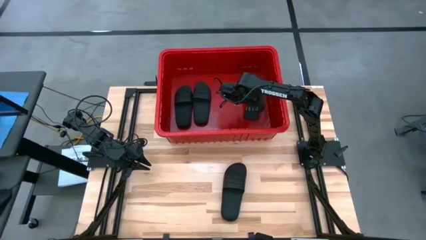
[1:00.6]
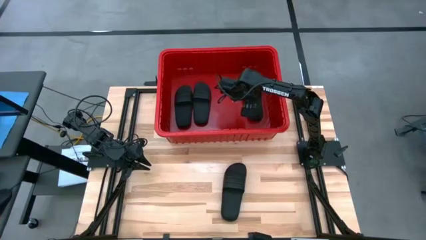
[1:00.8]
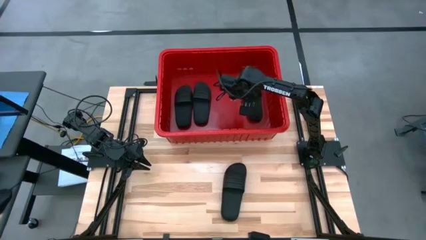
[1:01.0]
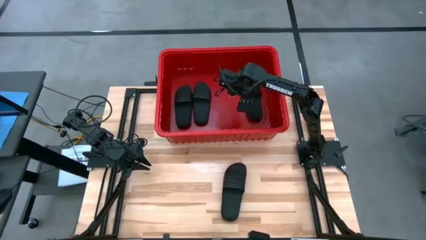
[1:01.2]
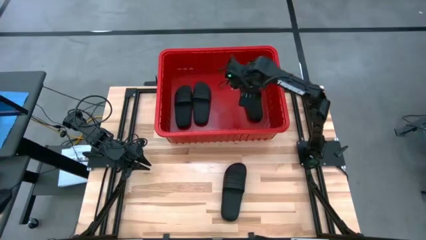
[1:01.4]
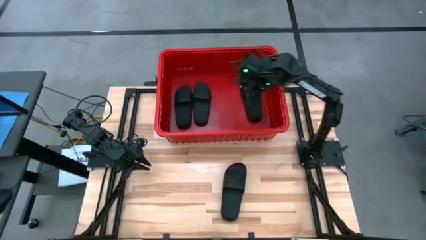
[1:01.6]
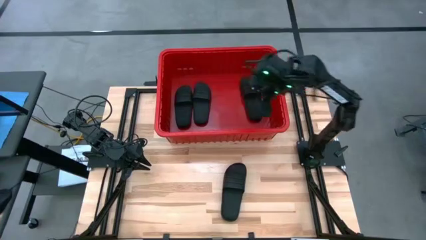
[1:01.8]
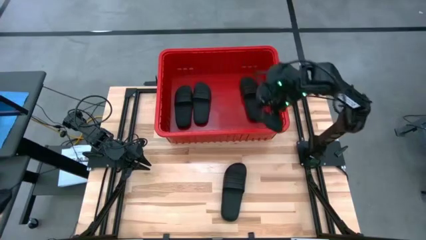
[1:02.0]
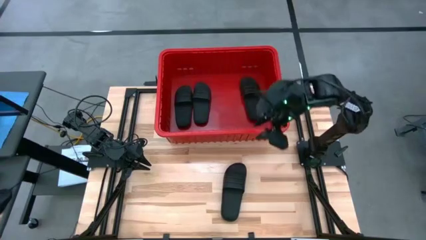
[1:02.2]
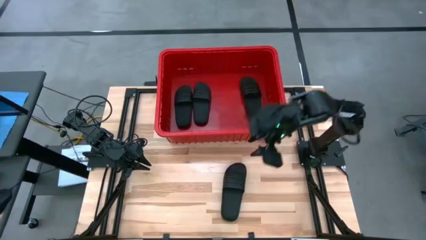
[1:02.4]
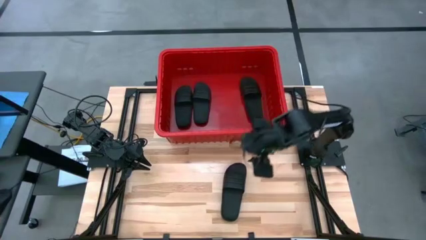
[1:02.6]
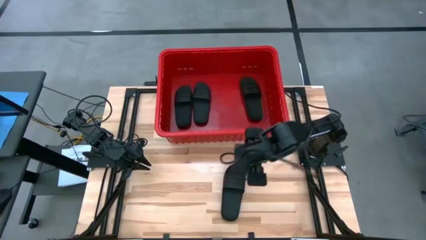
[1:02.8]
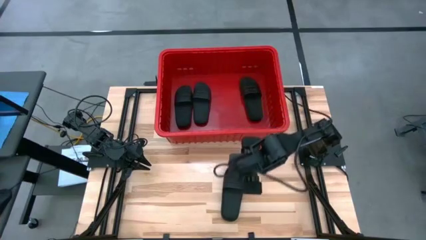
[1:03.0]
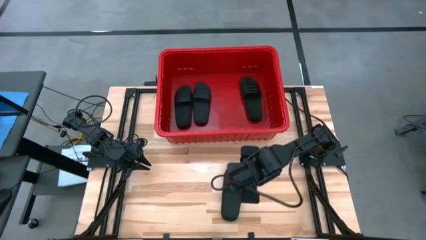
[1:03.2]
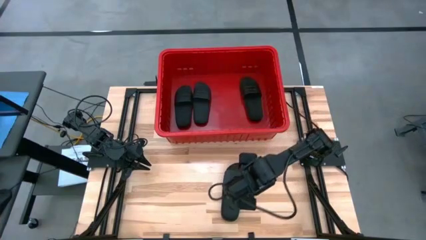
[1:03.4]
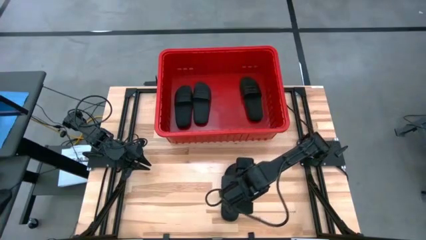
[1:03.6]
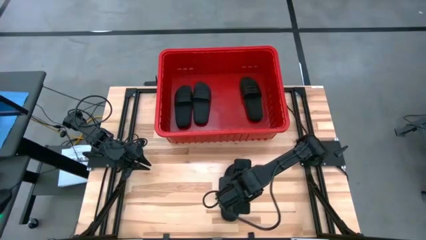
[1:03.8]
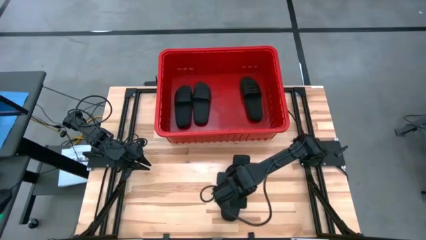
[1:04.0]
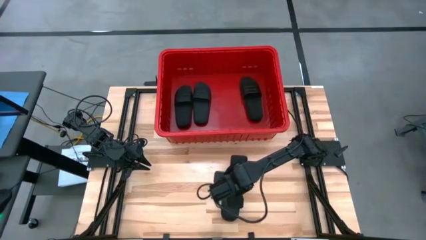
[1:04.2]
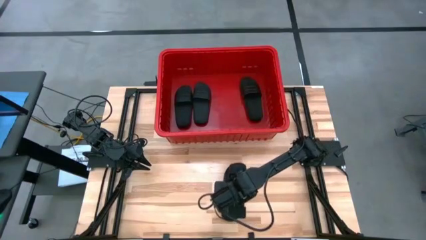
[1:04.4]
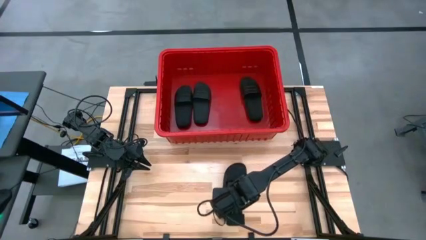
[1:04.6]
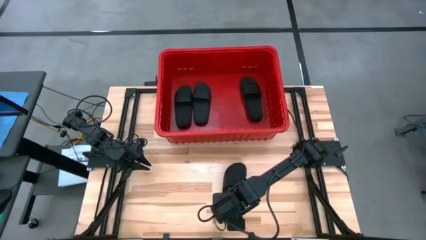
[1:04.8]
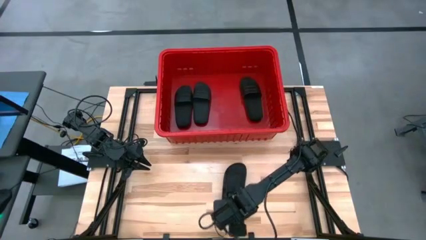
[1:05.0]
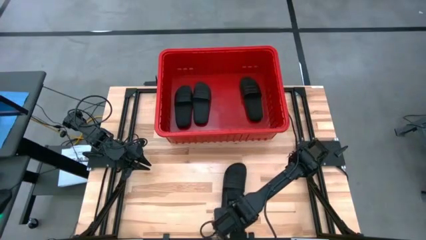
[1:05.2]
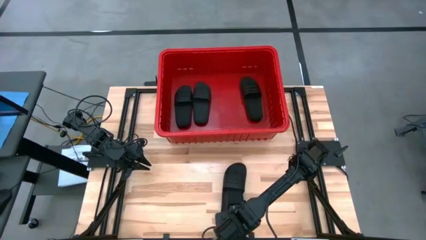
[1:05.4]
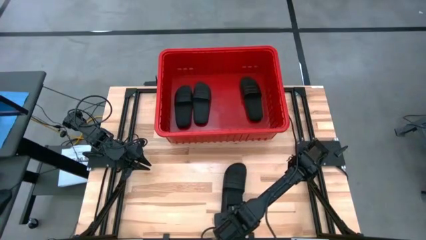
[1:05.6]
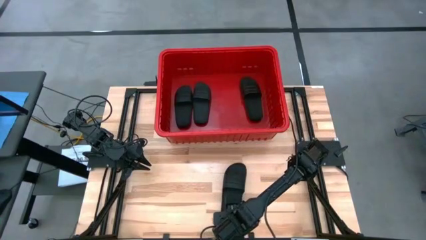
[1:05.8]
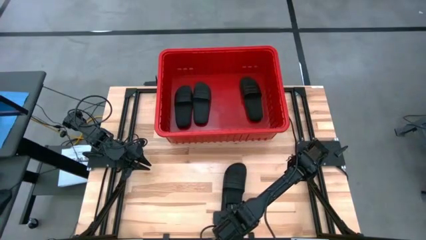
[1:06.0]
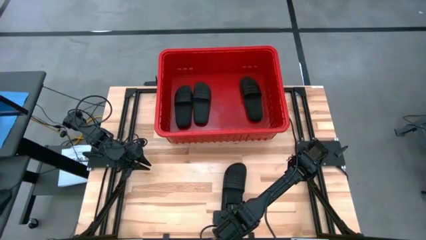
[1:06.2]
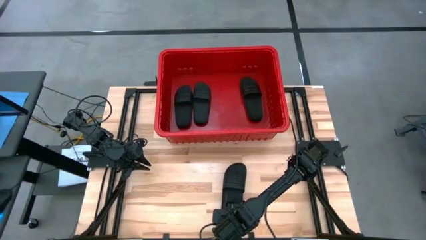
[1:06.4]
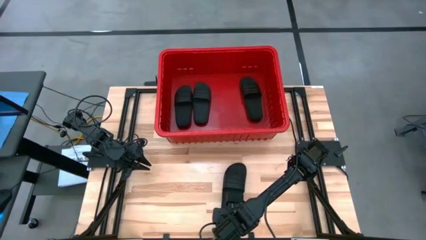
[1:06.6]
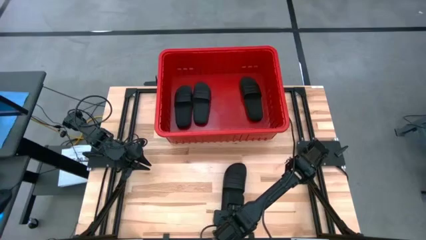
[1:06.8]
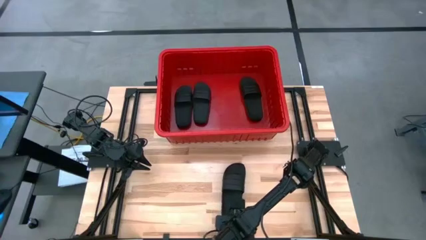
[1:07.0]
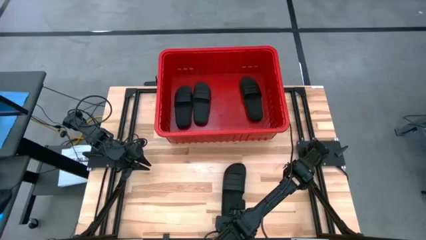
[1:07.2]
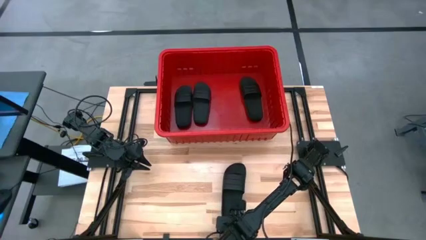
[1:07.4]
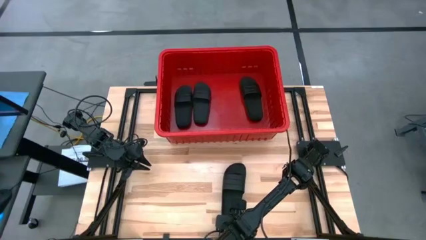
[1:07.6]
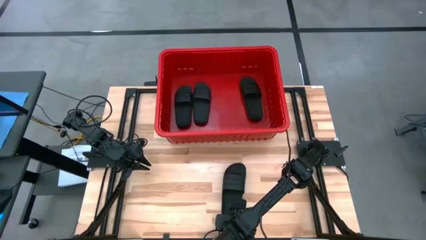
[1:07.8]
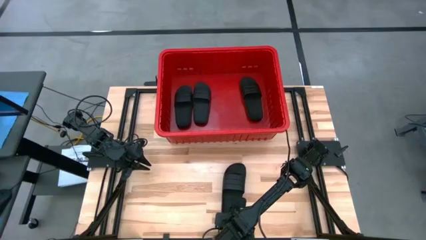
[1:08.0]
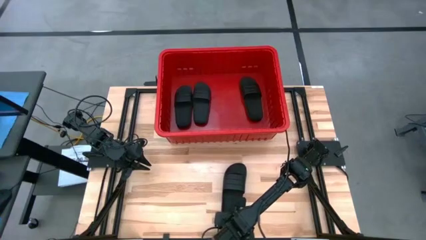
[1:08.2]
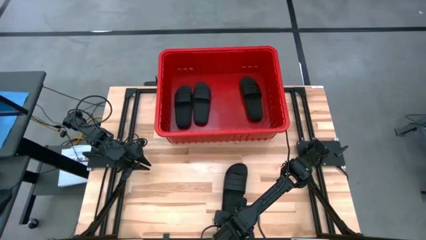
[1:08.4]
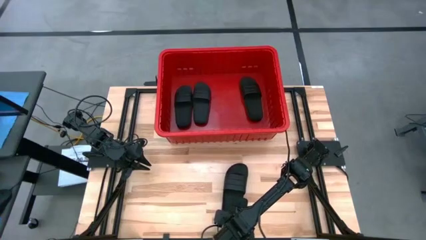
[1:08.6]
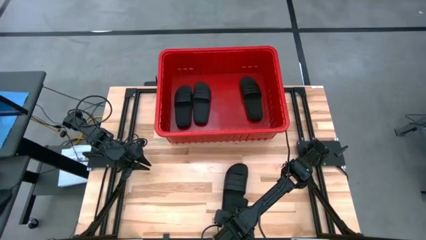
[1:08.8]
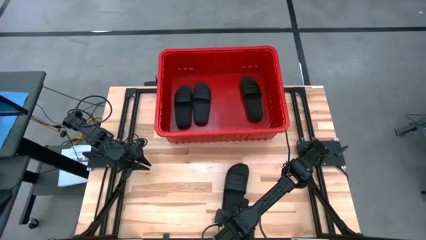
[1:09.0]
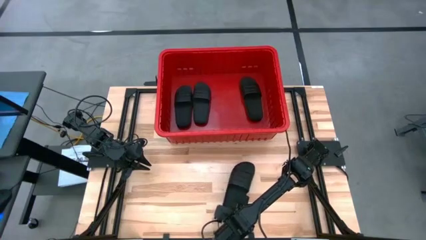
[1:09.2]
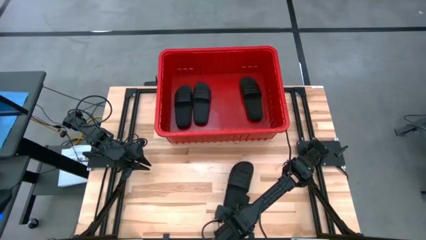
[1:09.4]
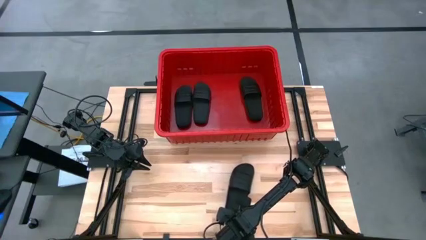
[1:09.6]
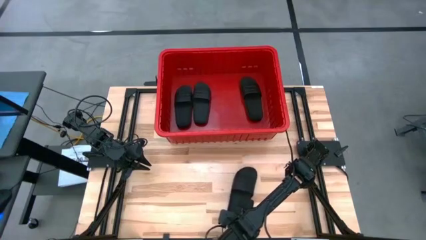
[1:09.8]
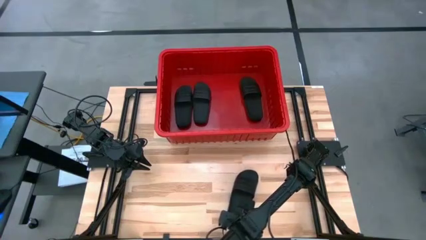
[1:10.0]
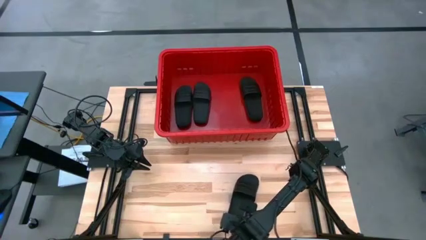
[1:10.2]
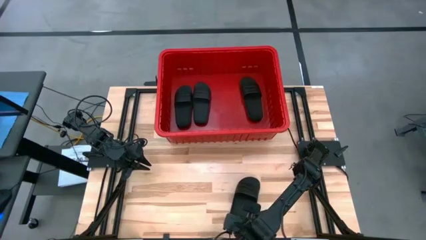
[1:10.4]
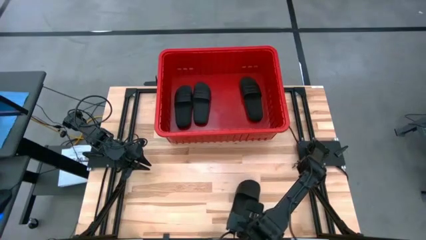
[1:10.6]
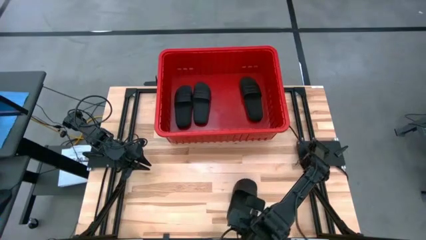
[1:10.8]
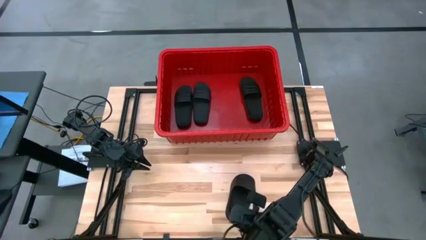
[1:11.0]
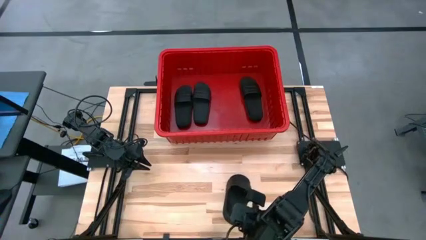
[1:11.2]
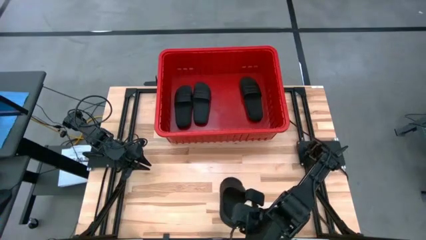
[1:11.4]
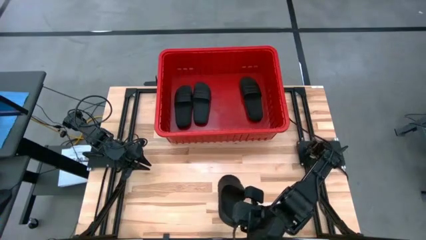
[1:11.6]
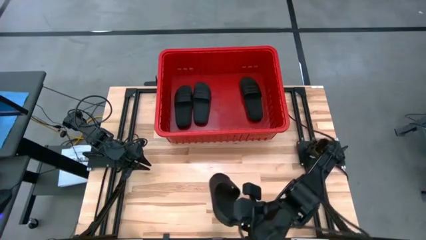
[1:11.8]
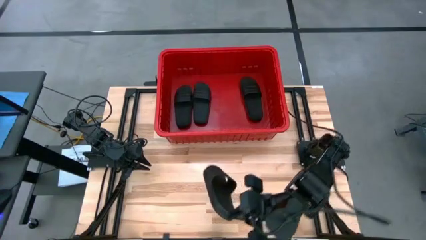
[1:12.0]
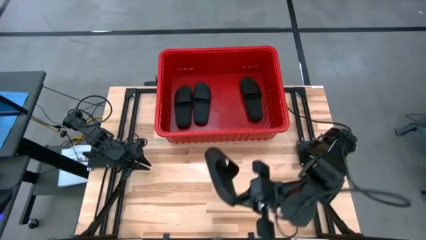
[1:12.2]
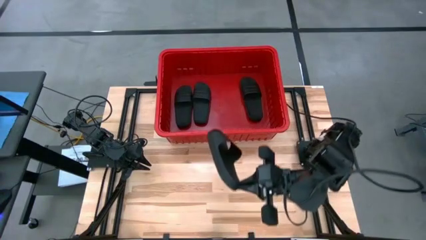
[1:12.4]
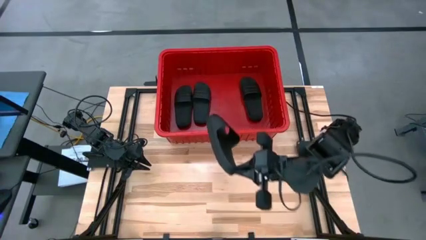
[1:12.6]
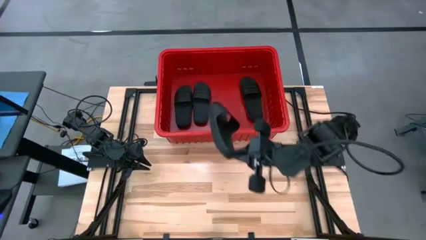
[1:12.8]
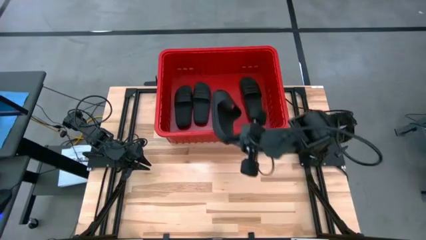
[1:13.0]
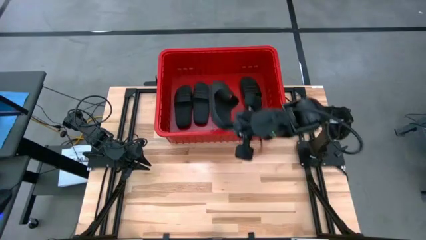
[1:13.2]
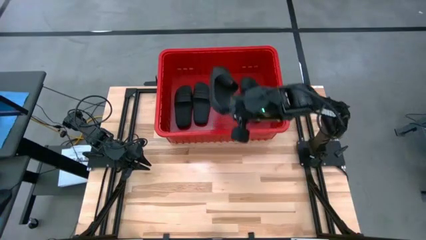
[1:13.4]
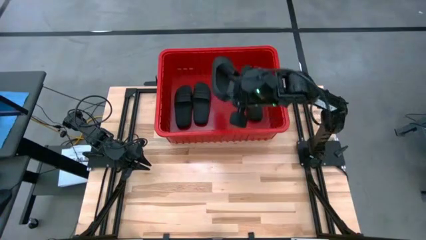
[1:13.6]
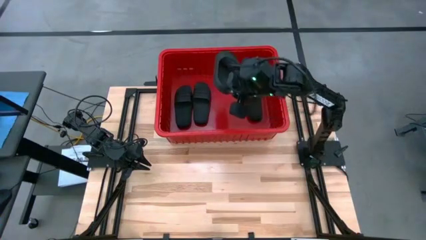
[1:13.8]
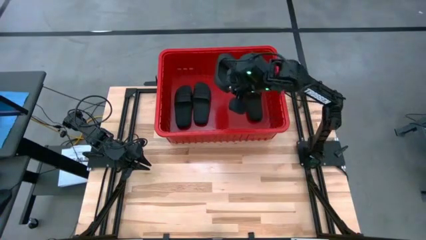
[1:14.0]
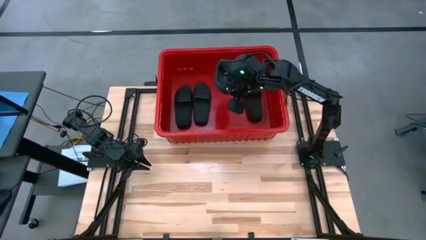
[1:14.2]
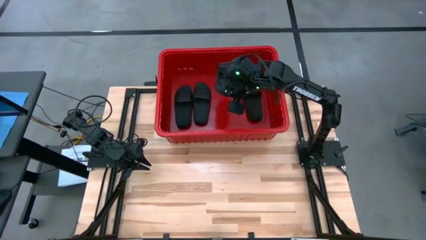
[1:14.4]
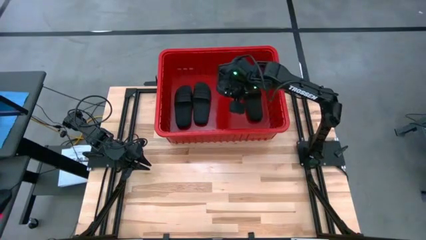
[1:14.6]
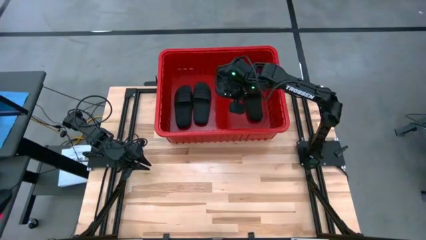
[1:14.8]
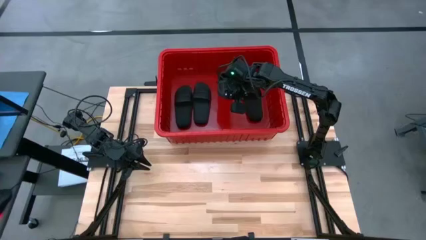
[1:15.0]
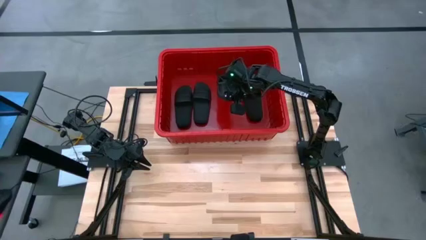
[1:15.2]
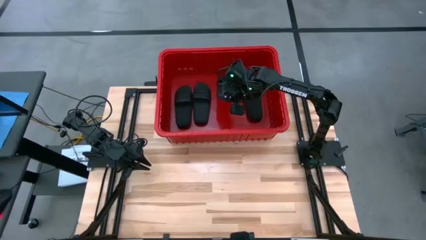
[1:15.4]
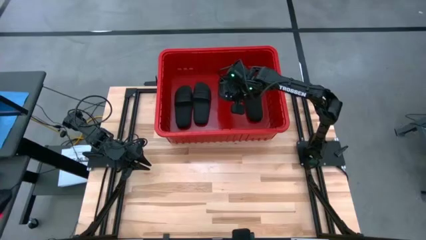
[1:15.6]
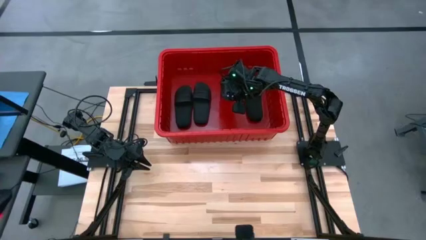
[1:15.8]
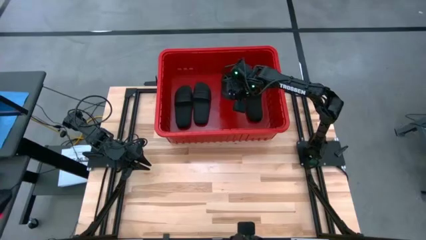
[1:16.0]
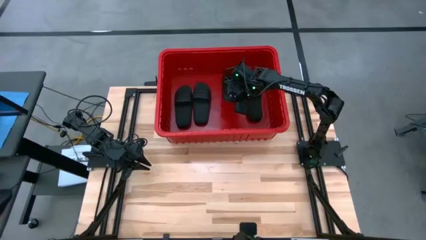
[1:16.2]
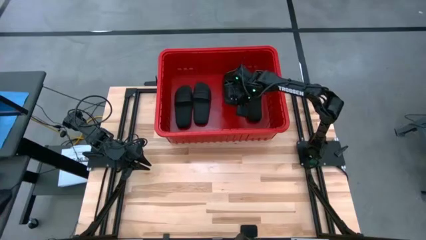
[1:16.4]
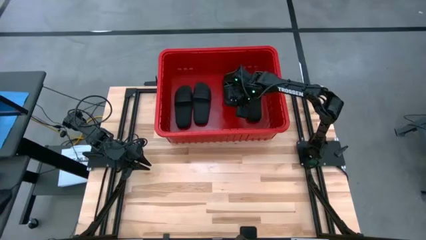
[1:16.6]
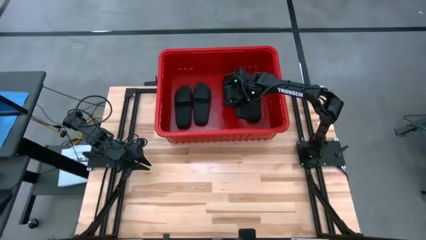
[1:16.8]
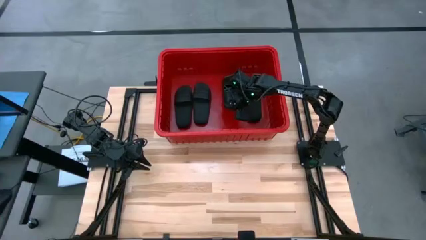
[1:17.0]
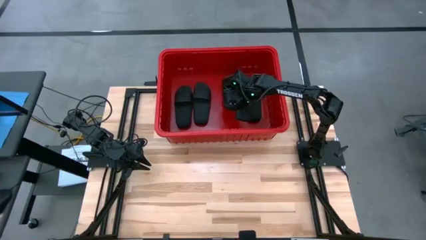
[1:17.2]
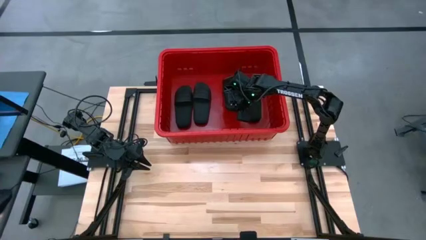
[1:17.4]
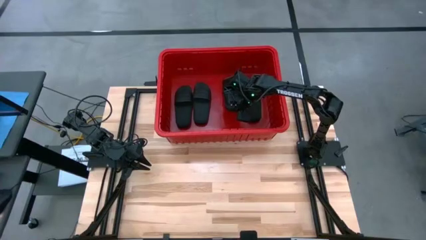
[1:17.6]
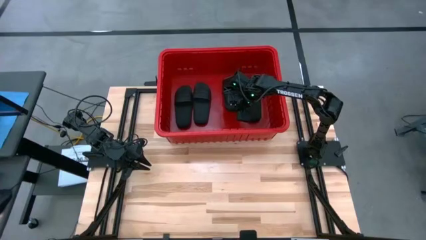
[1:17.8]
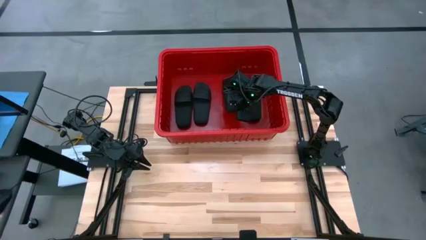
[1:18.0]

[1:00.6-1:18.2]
Task: Pick and place slides into bin
Put the black slides into the red box
